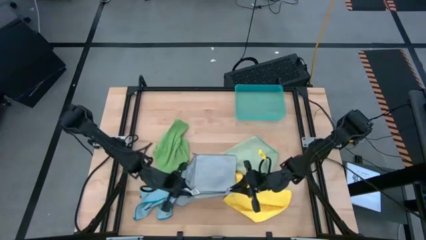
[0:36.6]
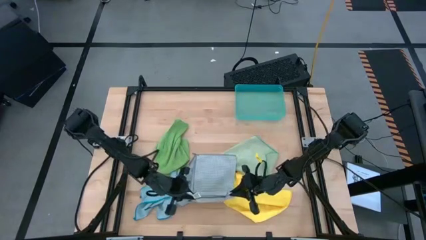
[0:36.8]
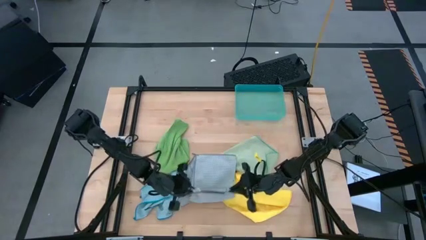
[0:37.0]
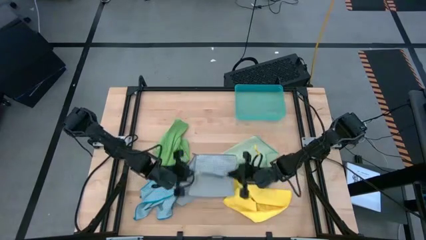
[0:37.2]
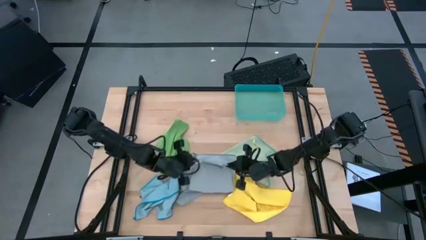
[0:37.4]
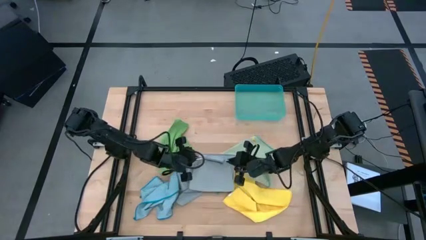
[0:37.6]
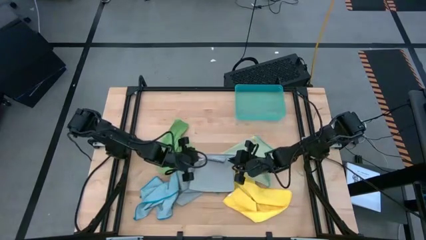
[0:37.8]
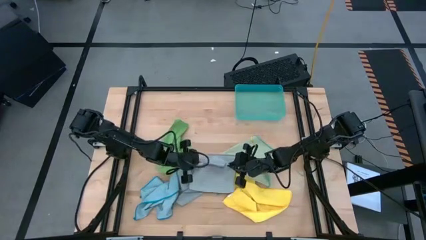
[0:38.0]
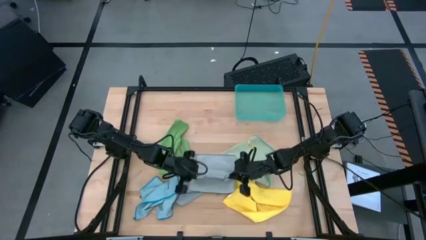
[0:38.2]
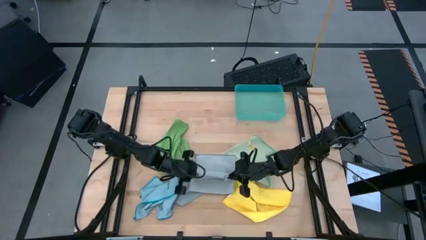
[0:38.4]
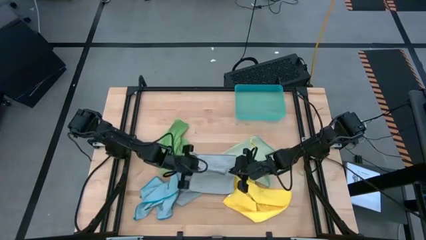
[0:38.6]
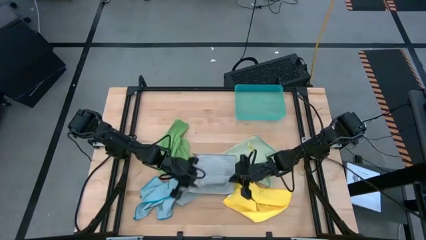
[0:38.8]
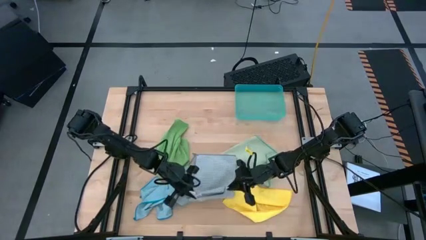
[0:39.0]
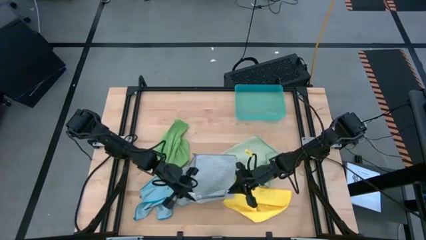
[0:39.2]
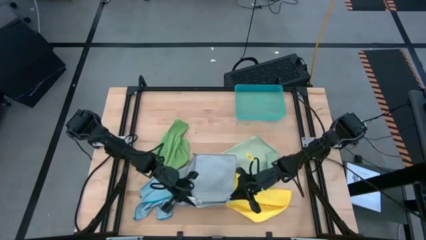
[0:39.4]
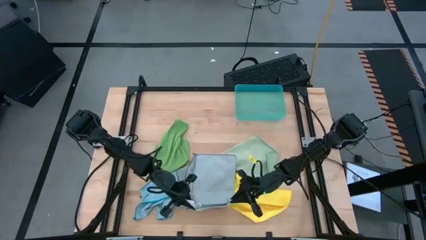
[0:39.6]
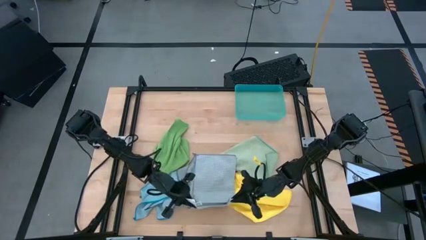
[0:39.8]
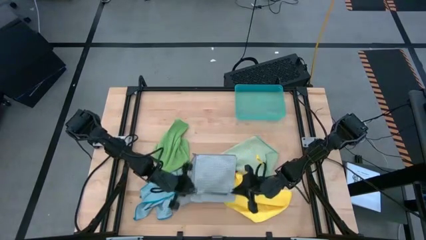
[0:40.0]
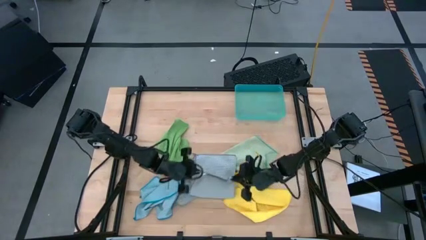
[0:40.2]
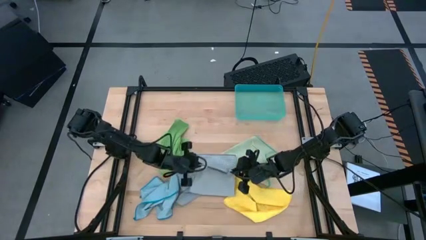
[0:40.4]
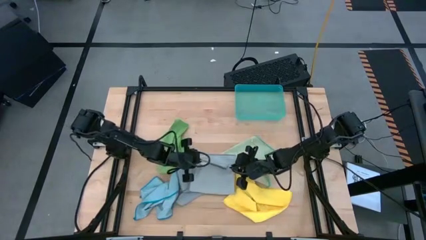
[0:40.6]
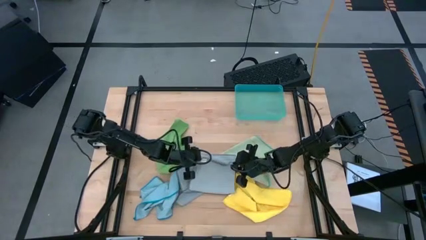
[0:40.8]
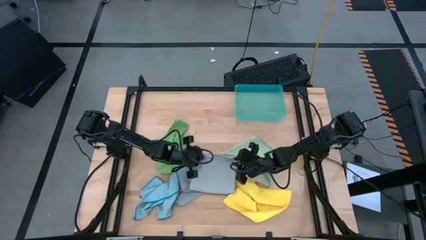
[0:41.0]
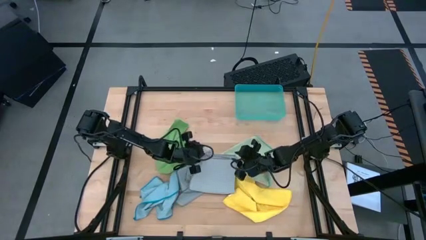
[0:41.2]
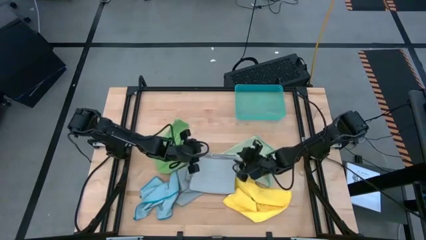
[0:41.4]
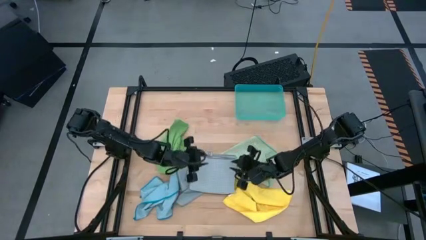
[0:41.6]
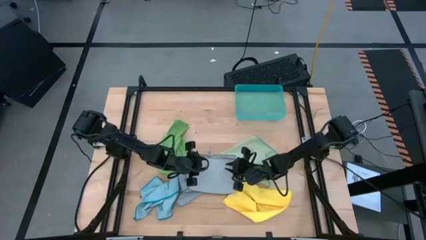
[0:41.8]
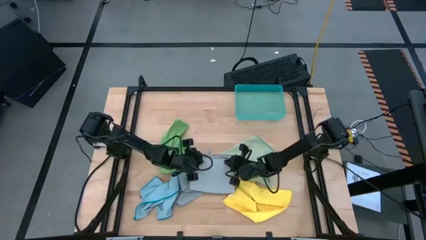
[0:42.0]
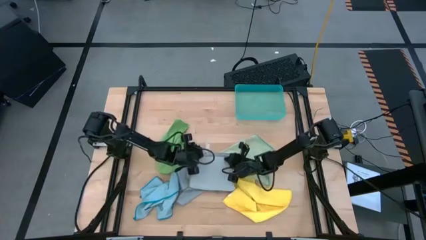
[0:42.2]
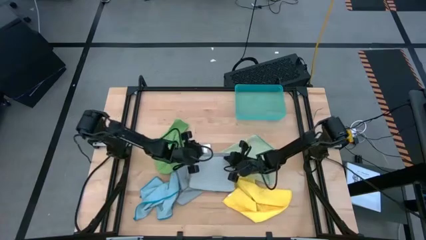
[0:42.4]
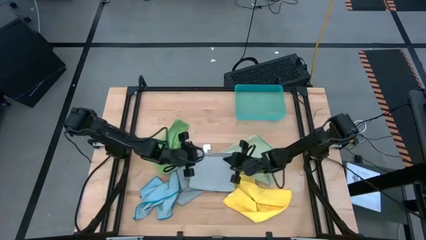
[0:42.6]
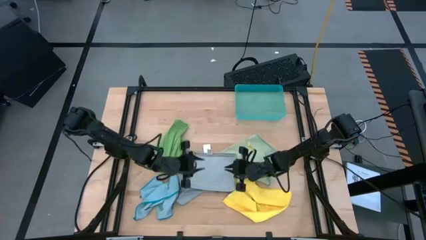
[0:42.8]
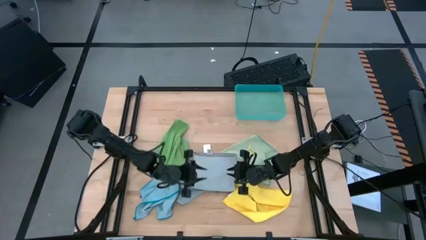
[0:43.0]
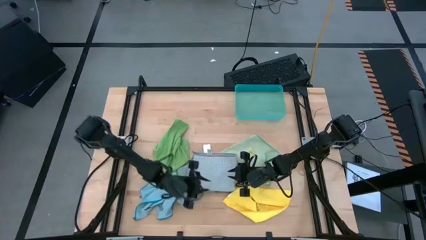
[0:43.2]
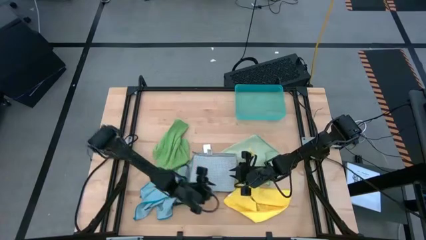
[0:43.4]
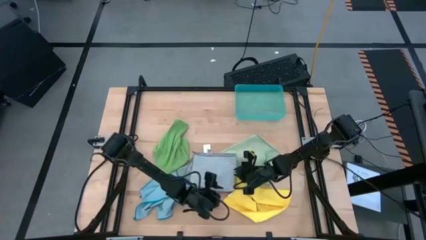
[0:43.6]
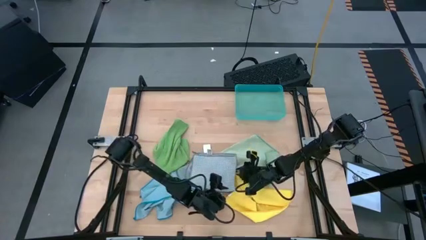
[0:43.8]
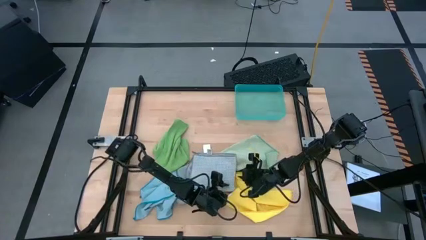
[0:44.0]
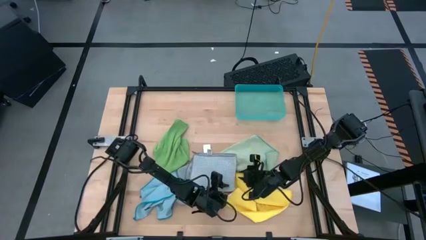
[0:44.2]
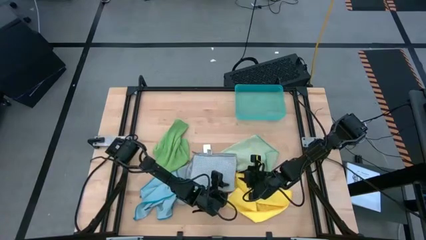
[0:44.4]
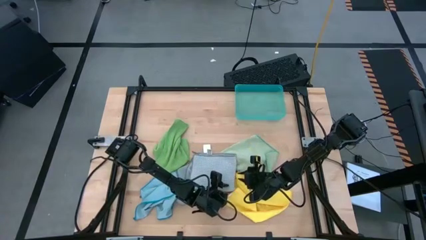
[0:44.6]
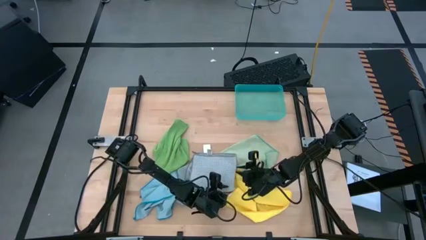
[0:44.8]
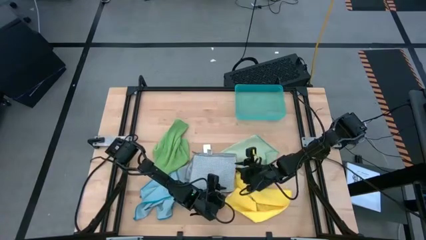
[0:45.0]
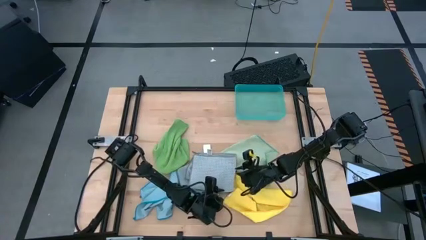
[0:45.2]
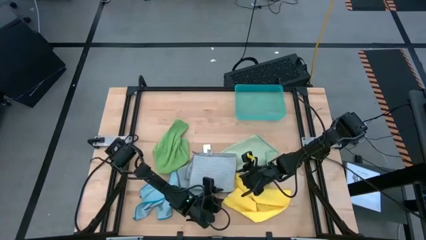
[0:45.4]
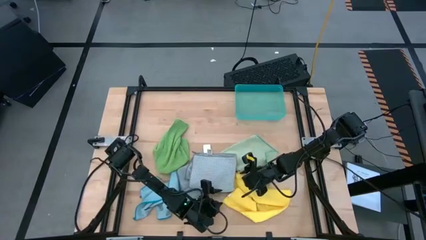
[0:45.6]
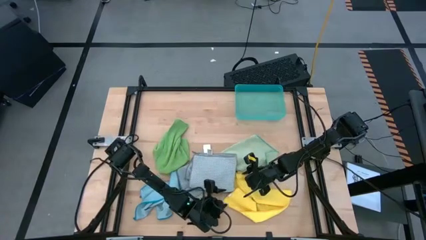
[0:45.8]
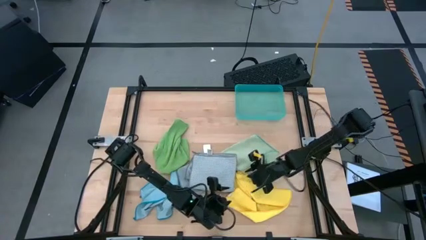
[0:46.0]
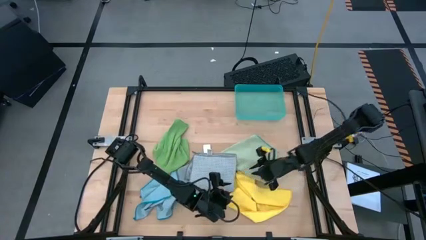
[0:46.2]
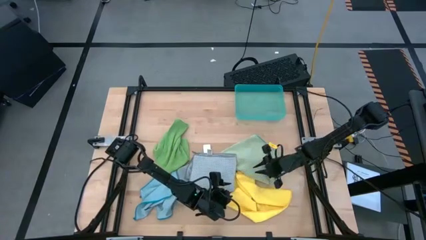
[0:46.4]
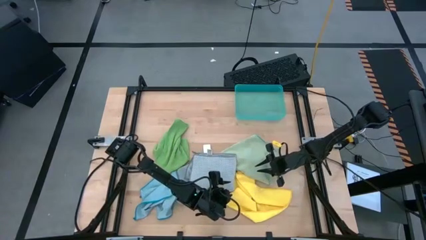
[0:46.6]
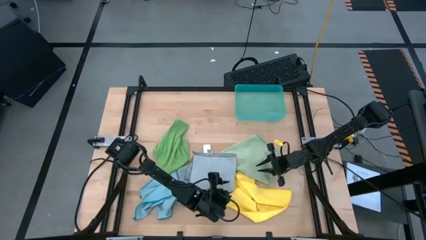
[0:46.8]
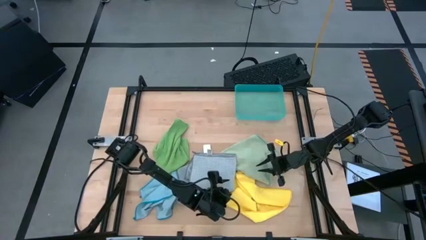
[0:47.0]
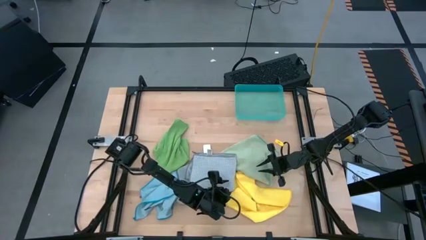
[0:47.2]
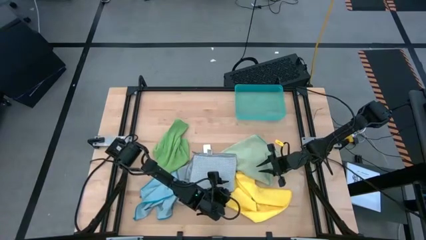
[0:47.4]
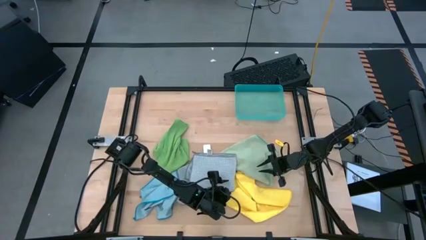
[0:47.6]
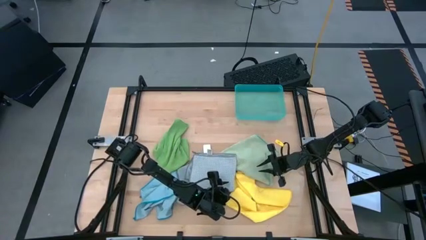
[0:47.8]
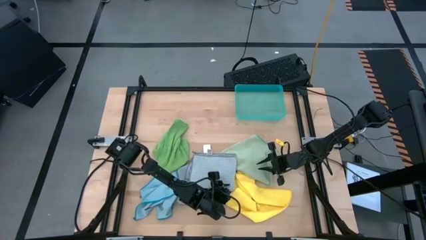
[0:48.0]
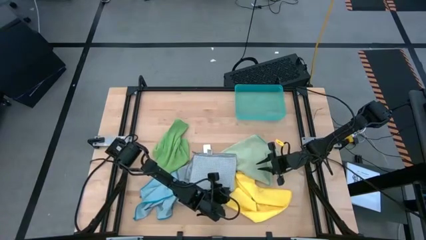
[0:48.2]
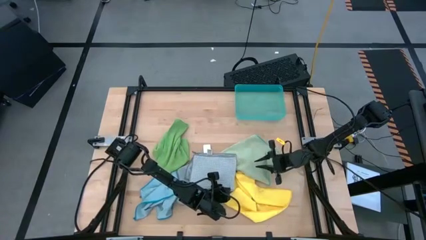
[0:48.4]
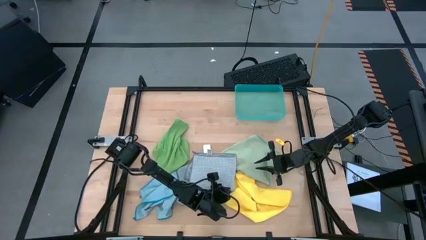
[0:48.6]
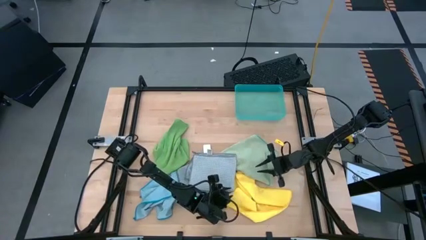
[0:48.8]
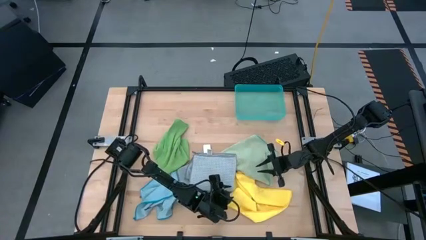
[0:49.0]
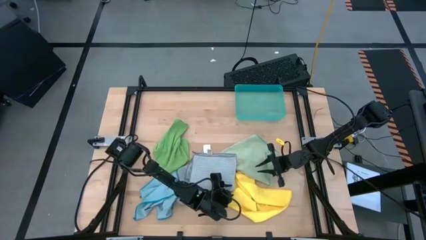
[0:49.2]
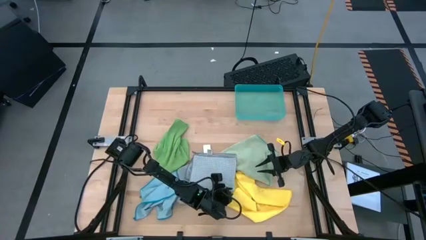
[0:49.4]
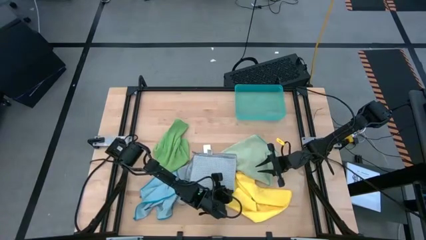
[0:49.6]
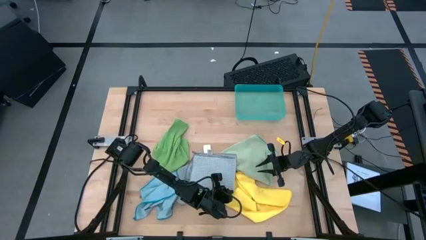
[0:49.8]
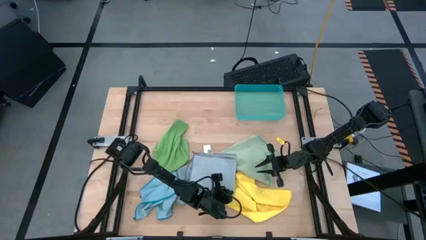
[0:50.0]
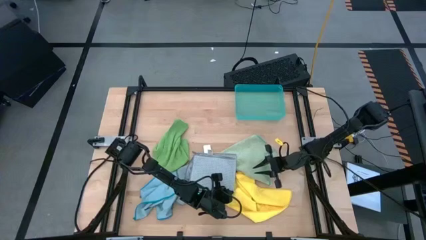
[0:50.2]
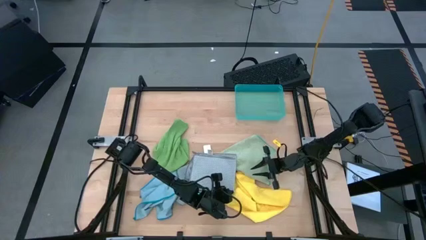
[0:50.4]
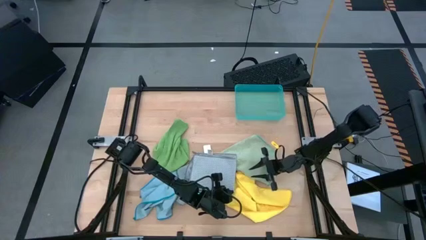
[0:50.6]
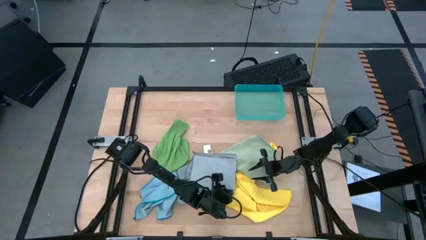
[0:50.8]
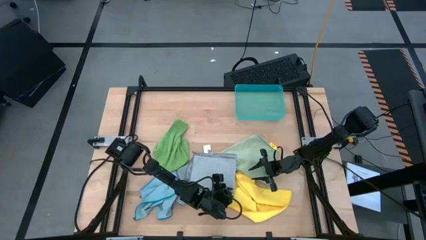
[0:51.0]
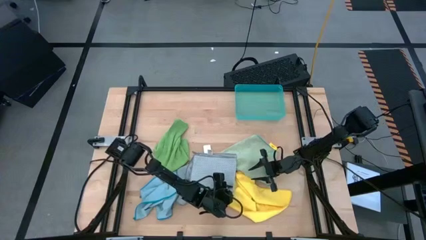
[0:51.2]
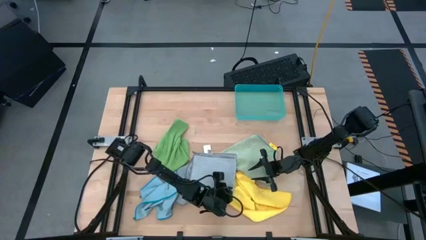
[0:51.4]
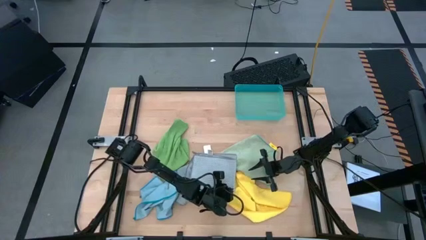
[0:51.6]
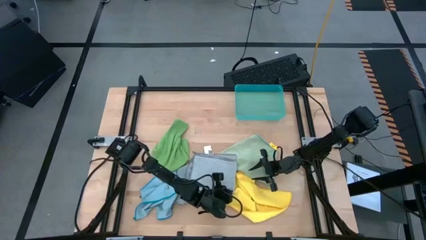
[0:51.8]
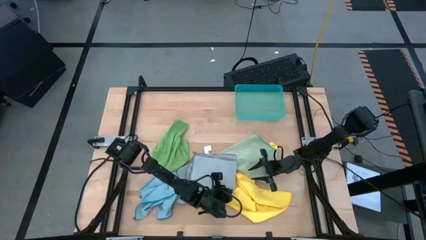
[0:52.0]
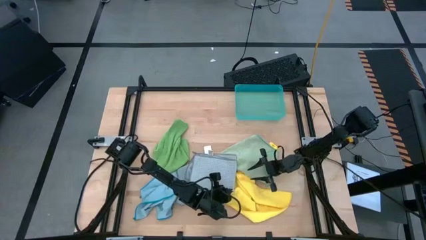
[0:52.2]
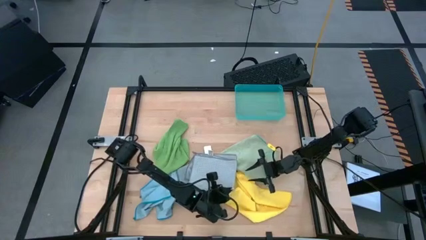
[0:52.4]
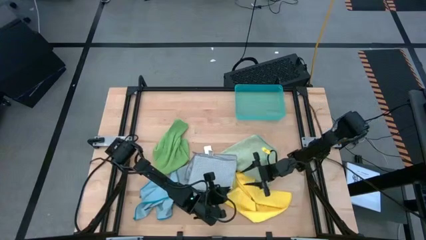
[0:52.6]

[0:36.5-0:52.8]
Task: Fold microfiber towels
Fold the right gray microfiber cloth

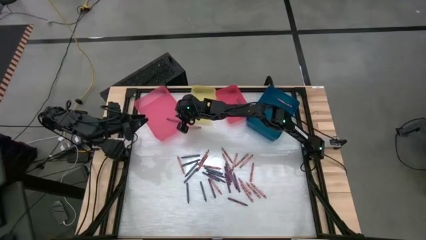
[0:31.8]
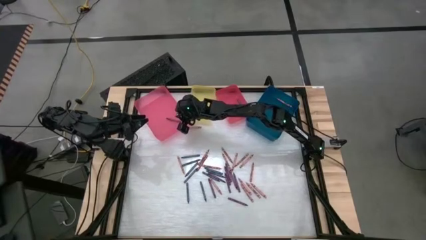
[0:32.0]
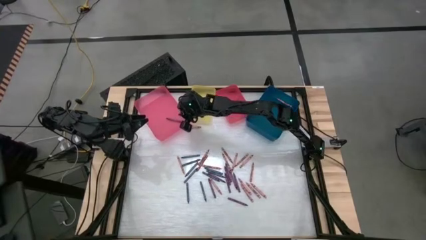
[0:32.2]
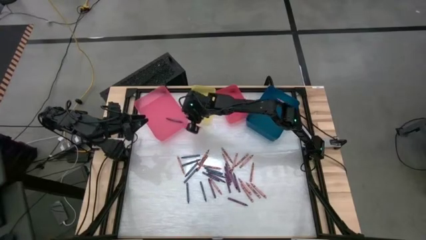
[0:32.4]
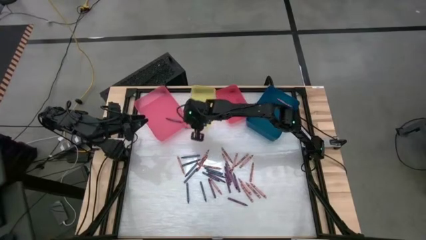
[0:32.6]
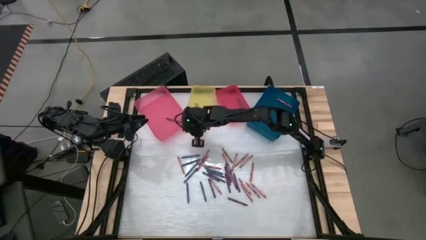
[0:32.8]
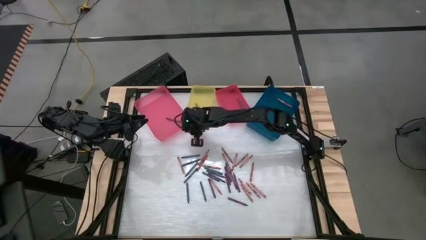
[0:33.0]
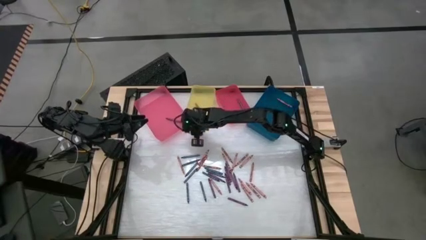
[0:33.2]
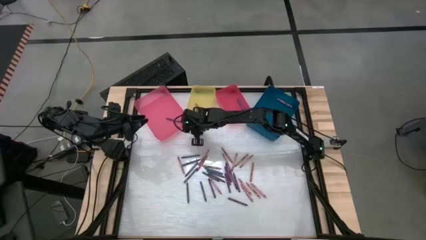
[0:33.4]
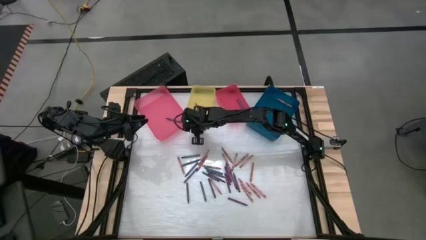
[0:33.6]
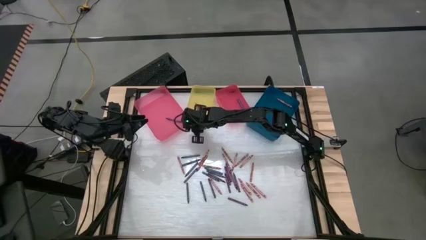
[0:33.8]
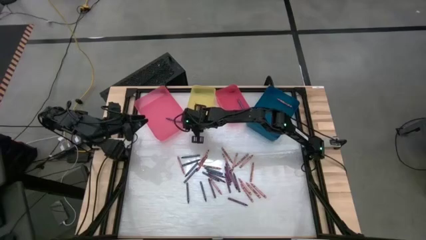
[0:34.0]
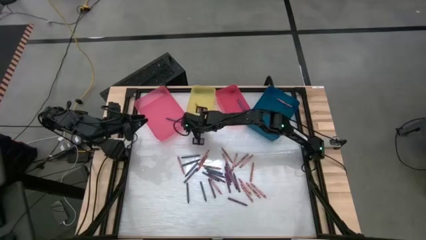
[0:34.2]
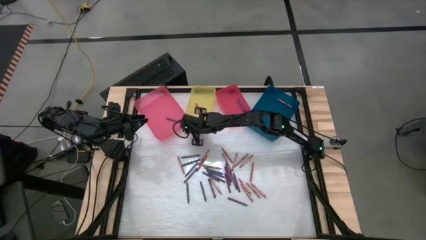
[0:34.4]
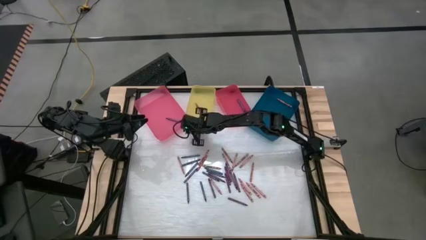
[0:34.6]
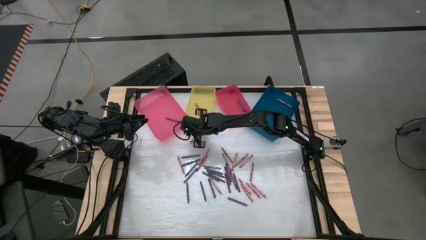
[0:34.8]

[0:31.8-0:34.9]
Task: Sort crayons
Put the red crayon in the yellow bin
